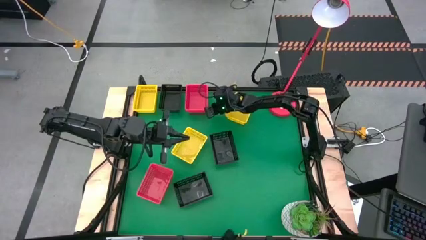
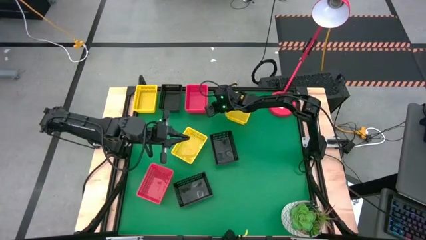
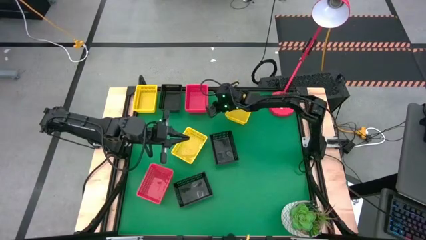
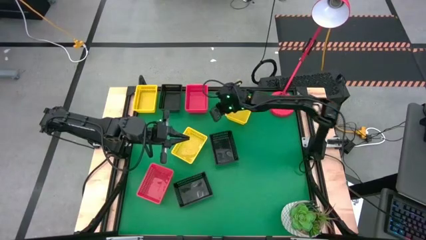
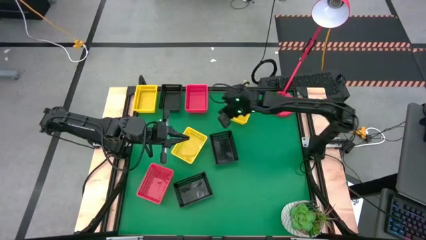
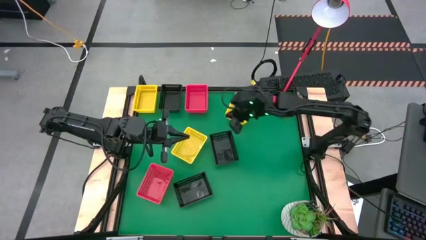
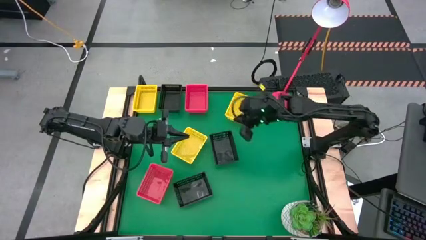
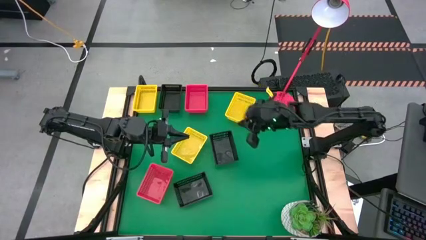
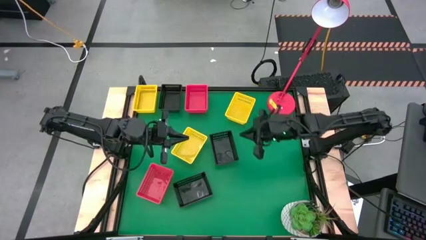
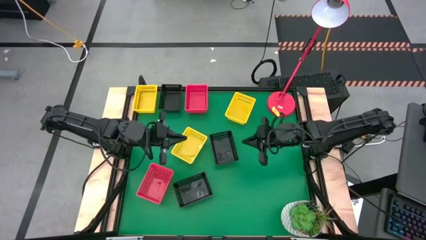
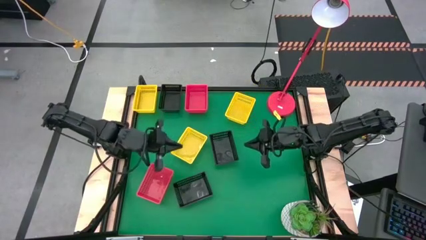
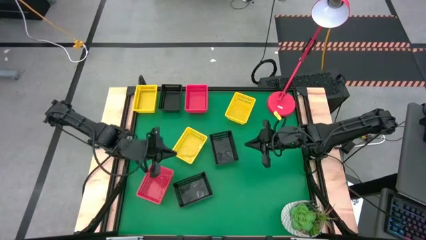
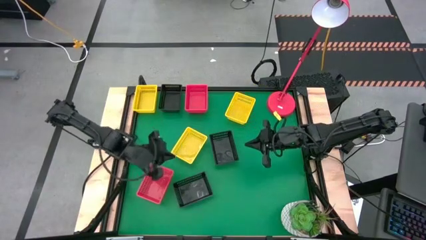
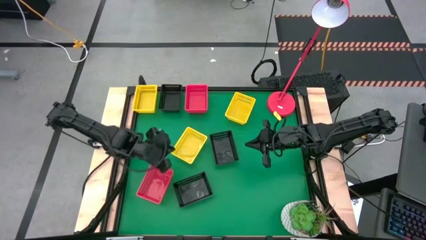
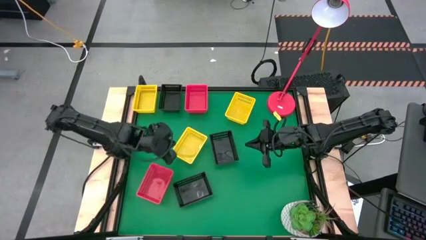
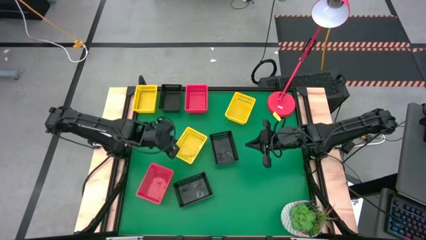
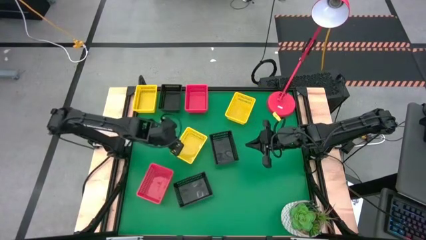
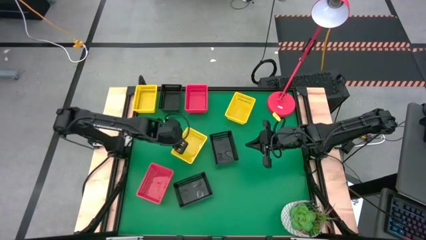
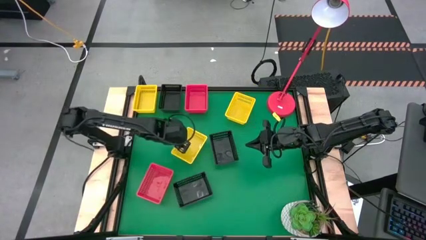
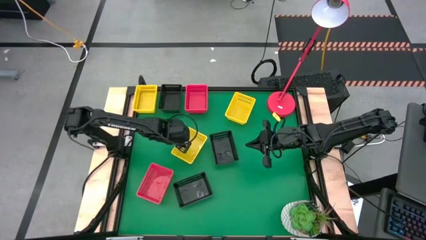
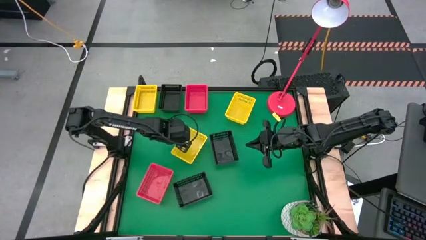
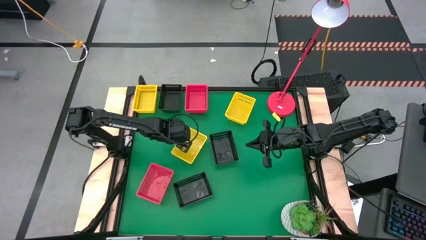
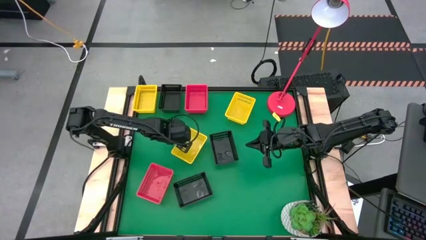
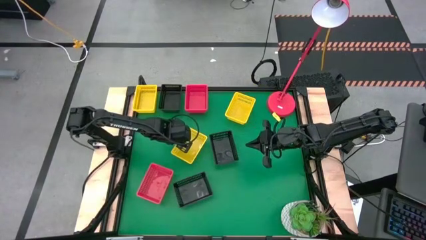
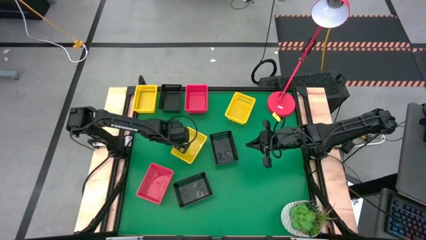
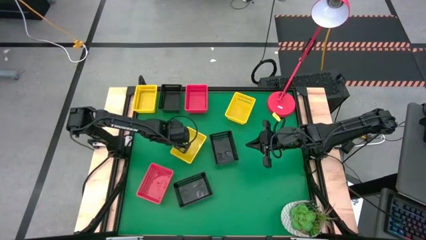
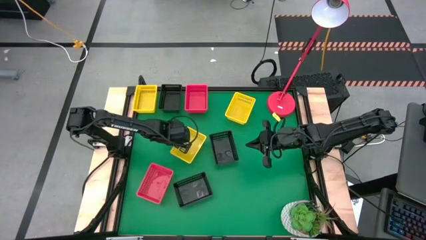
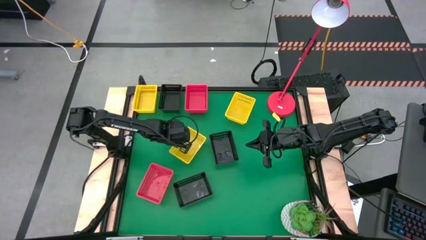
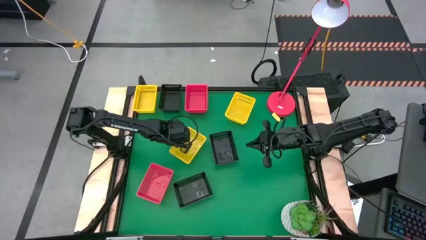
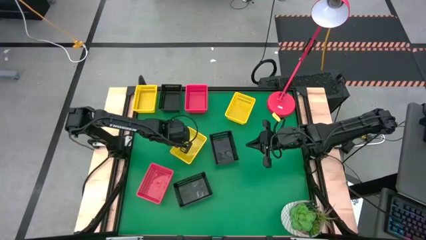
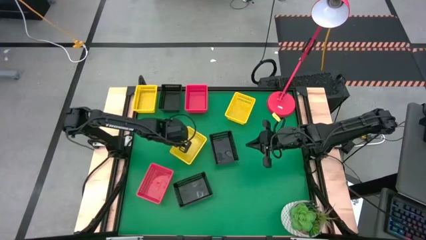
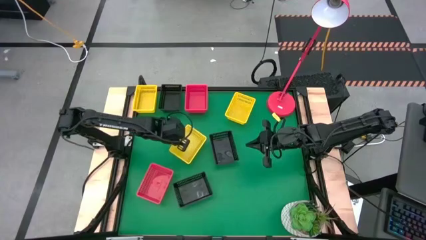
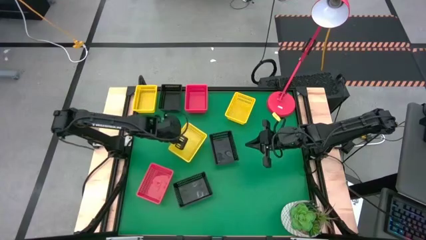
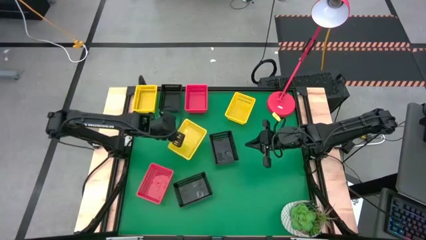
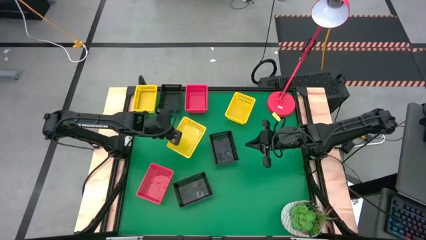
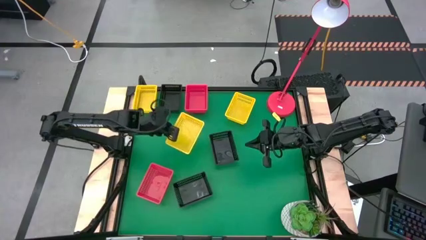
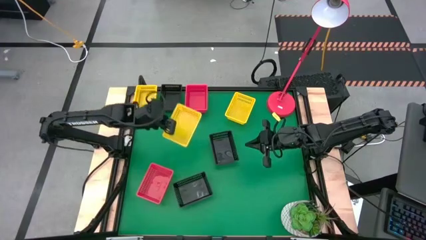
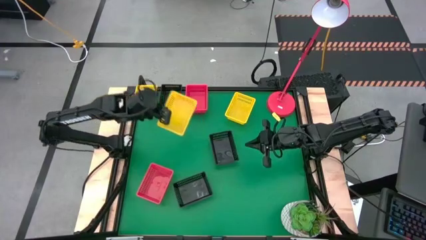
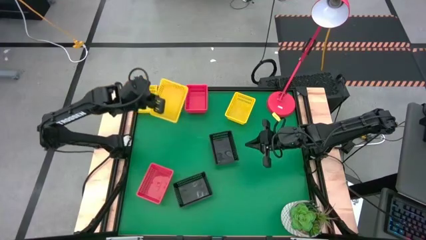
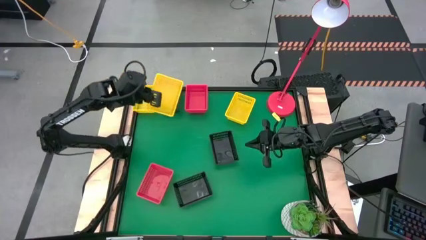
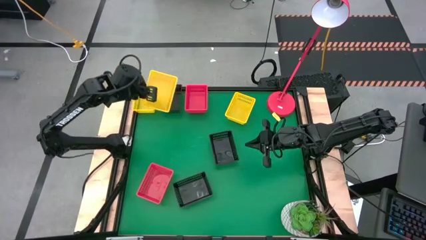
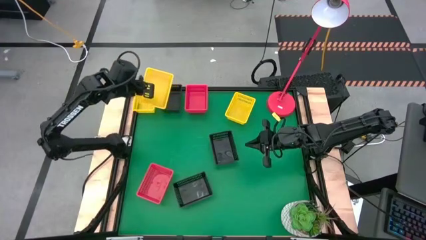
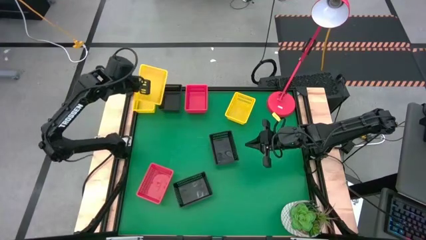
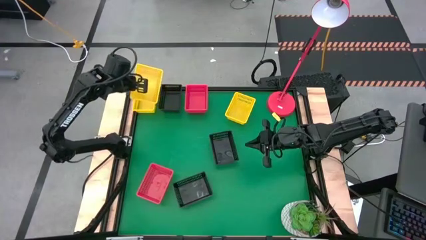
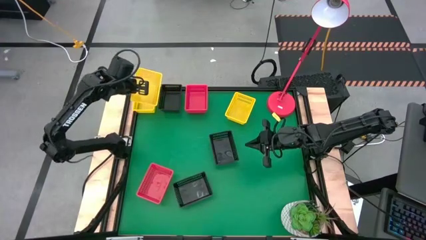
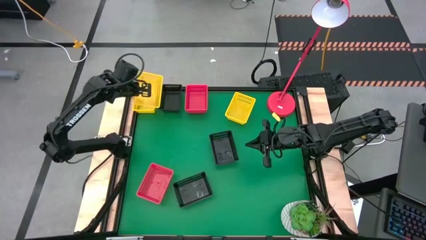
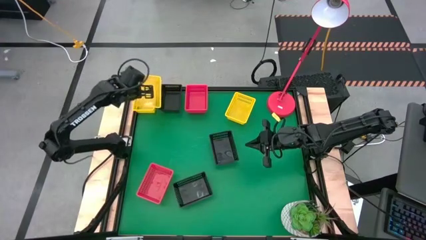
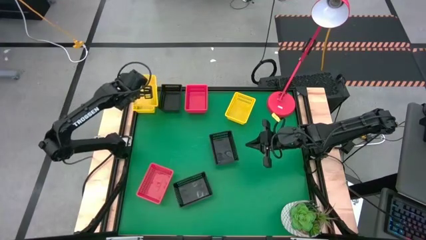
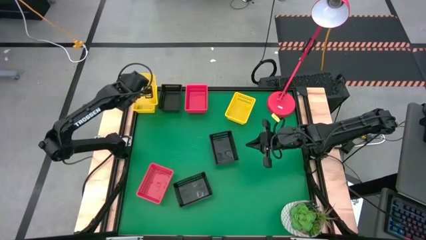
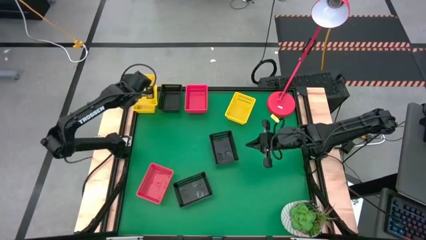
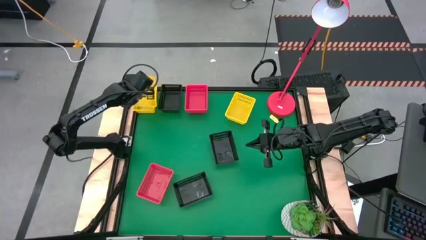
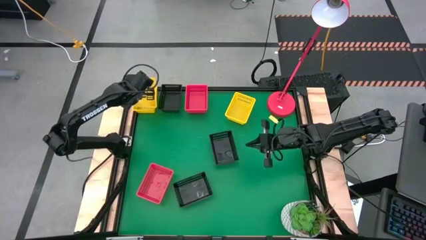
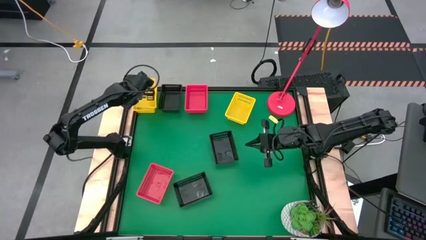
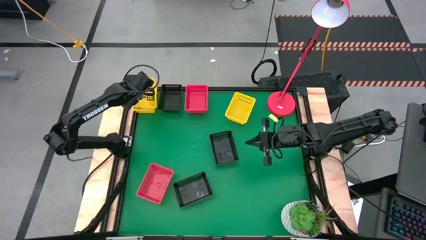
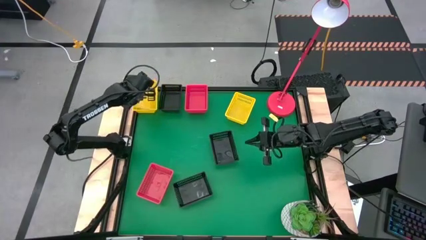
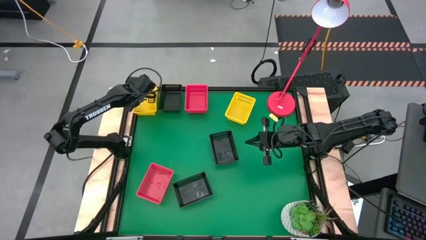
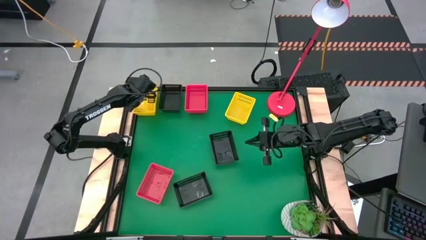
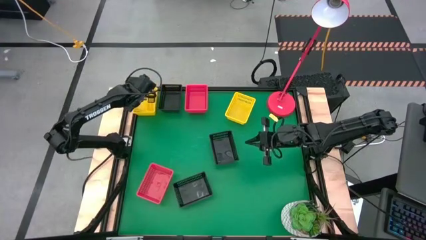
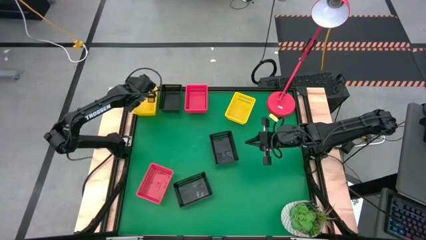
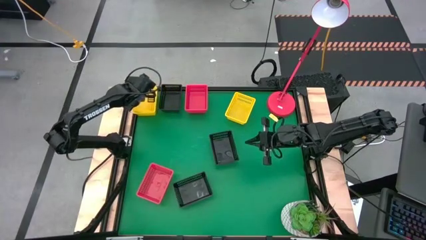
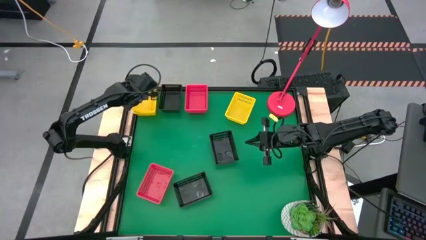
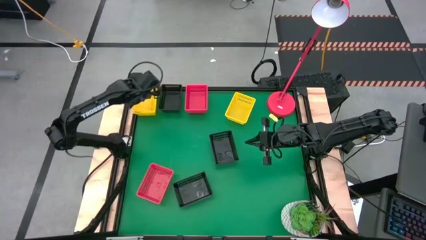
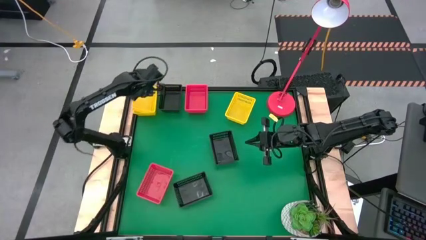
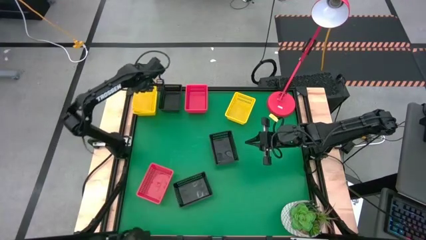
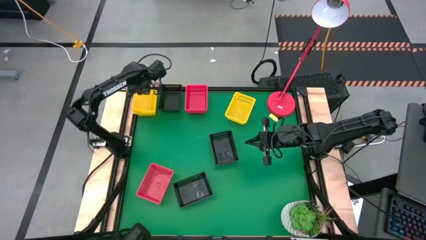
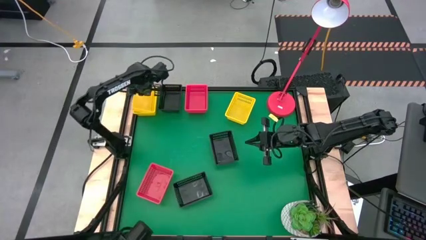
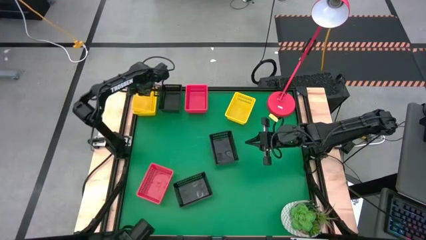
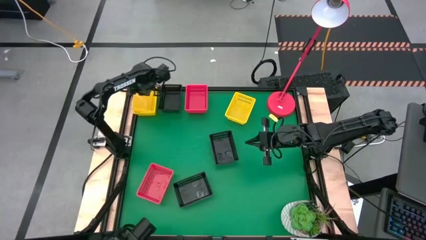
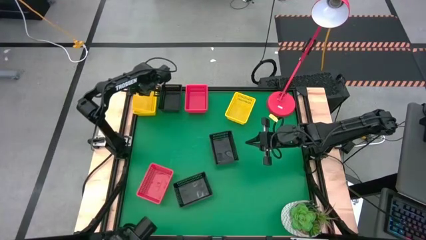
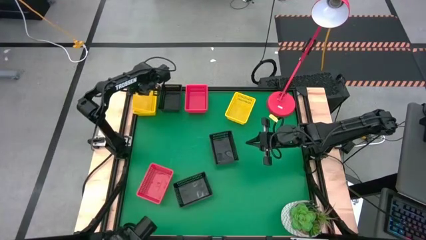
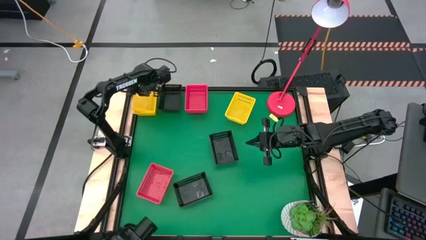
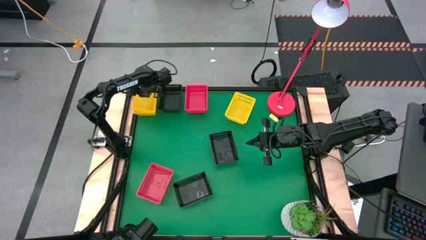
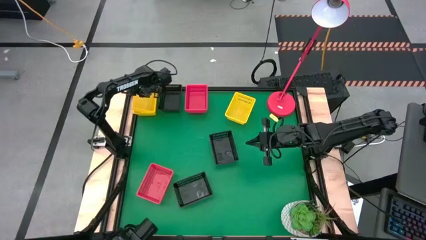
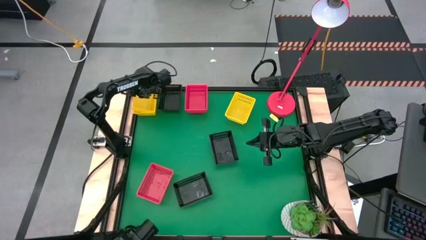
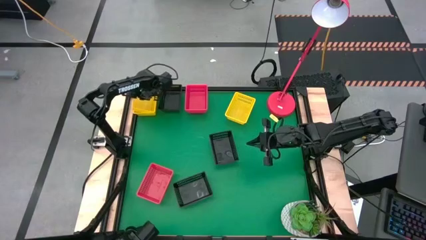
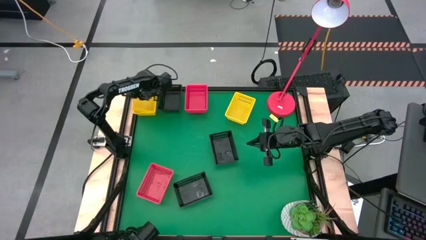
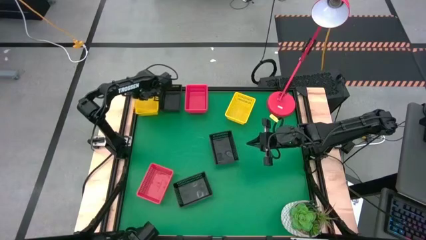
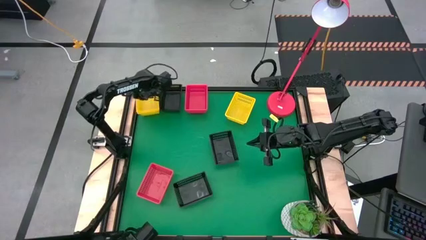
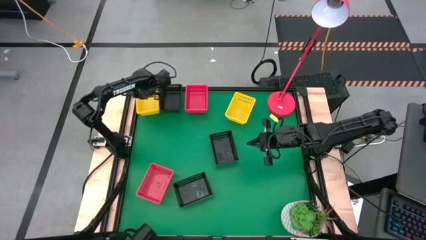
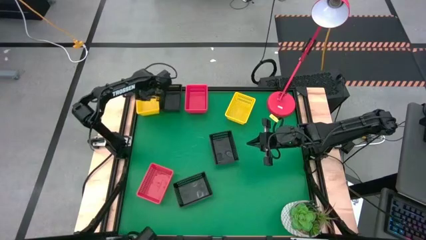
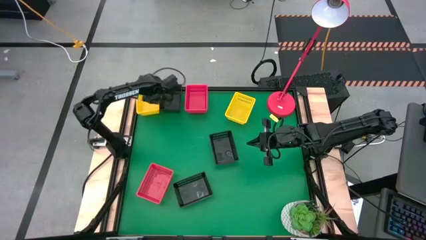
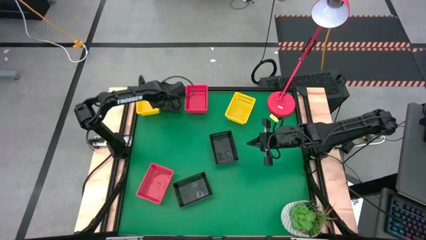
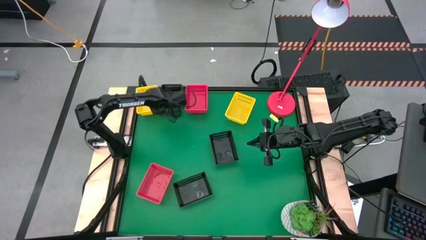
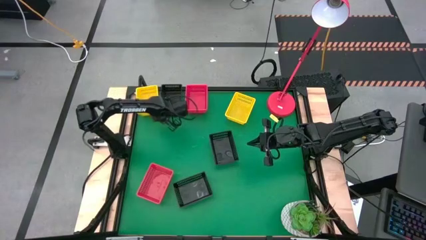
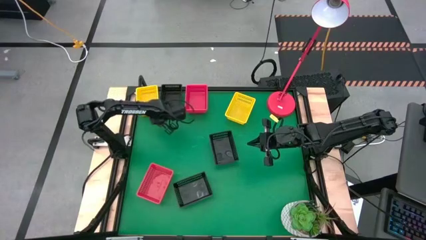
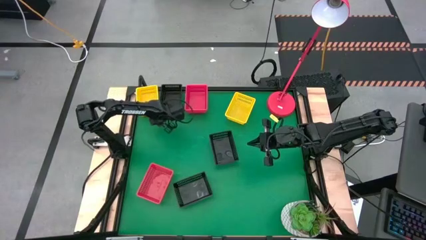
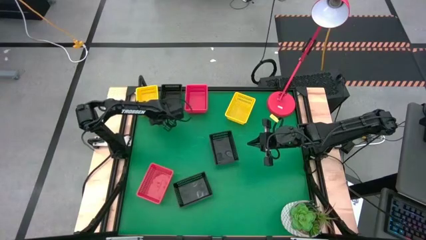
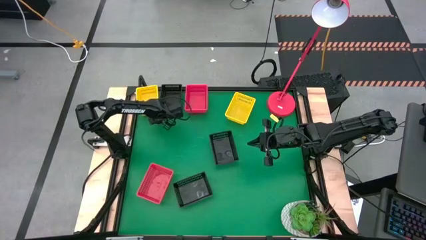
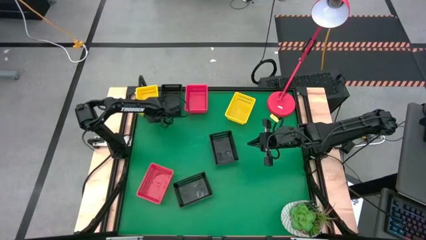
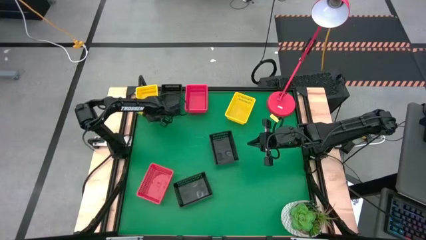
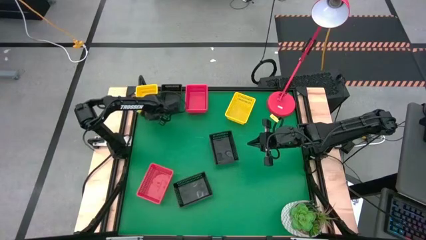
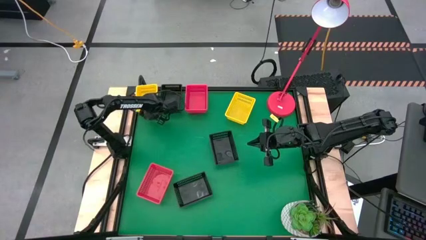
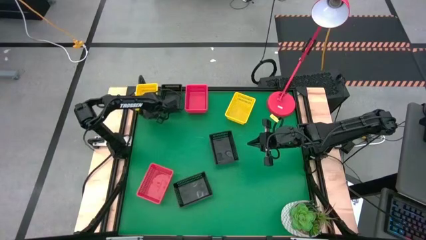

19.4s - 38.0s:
Stack the bottom yellow bin on top of the top left yellow bin
